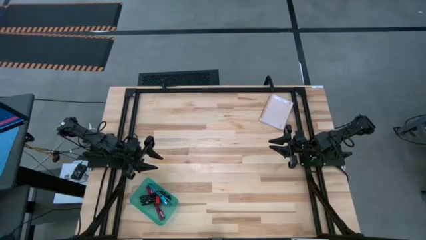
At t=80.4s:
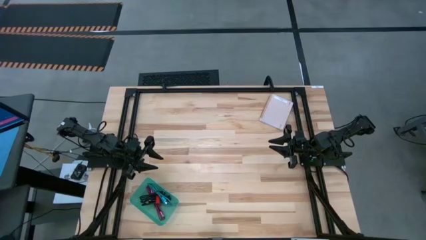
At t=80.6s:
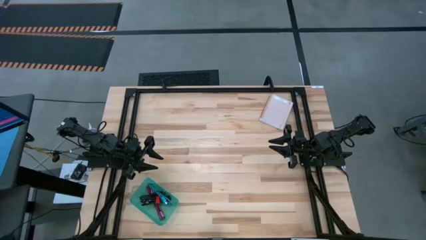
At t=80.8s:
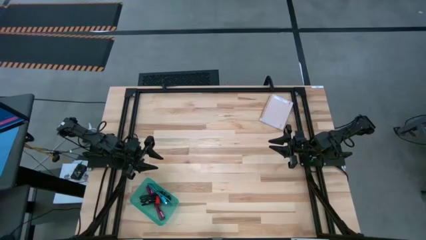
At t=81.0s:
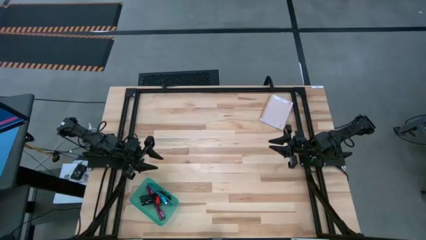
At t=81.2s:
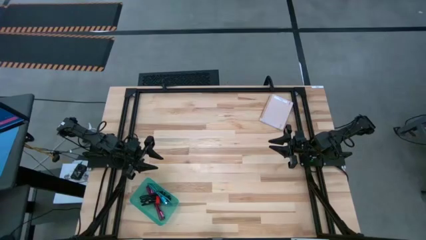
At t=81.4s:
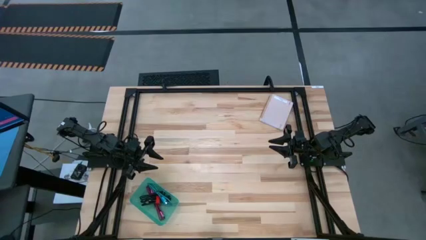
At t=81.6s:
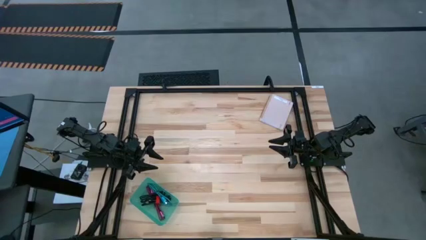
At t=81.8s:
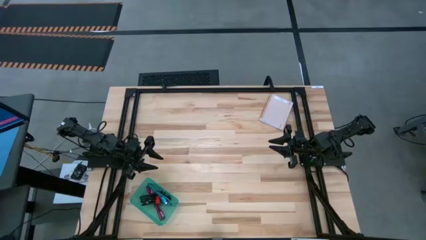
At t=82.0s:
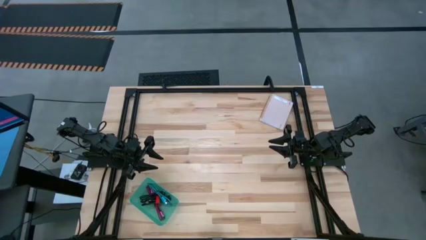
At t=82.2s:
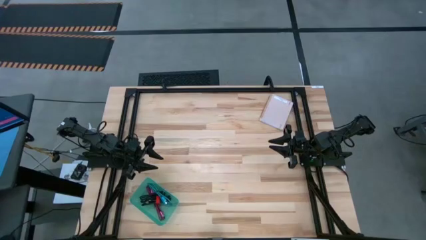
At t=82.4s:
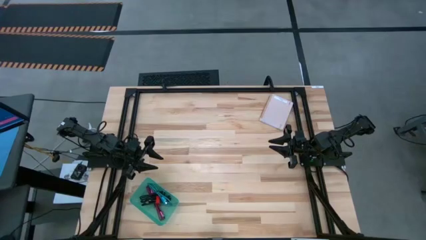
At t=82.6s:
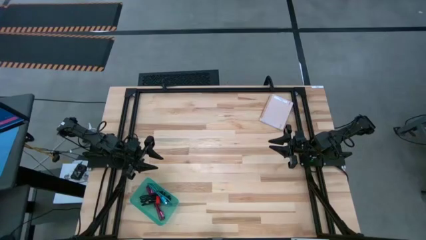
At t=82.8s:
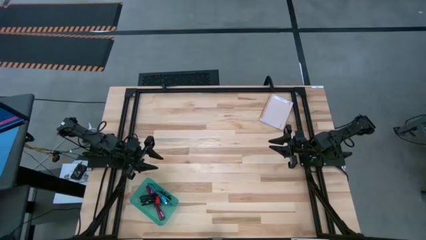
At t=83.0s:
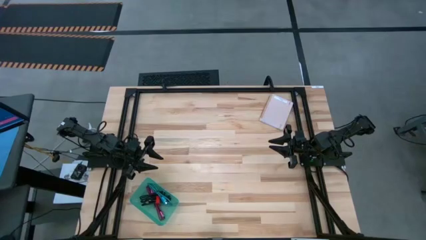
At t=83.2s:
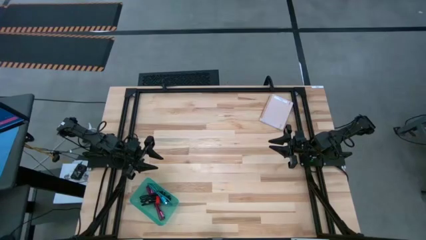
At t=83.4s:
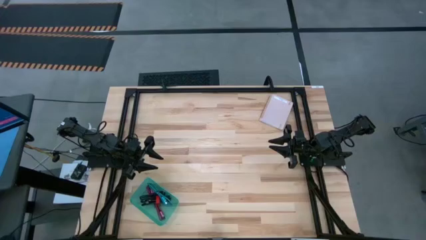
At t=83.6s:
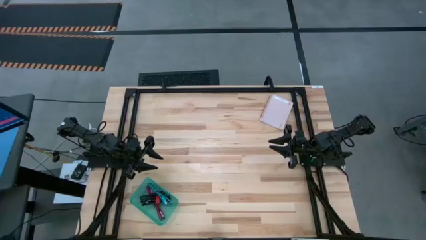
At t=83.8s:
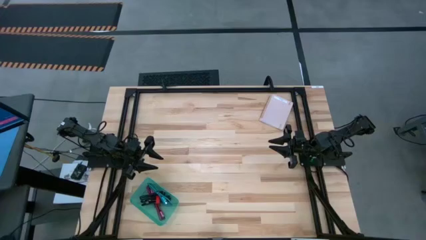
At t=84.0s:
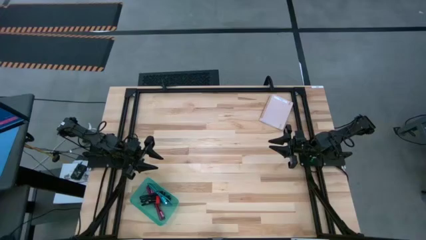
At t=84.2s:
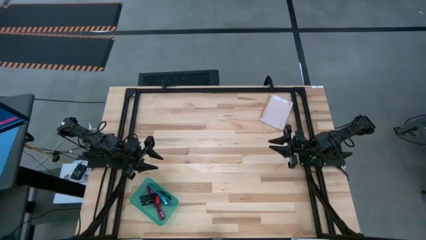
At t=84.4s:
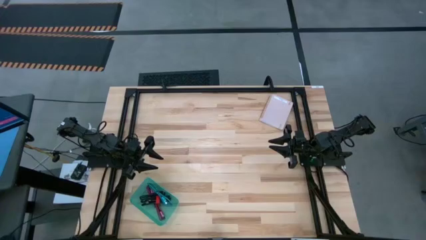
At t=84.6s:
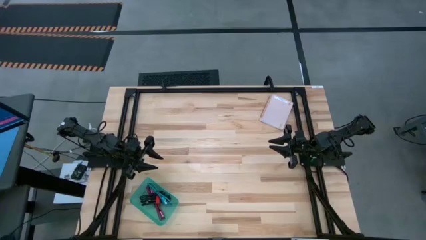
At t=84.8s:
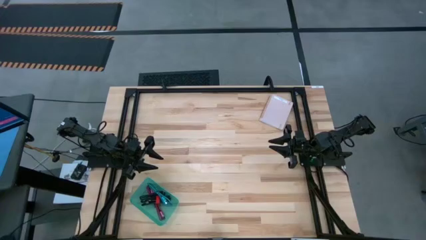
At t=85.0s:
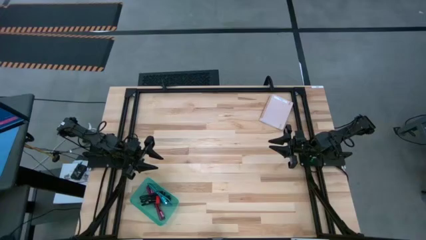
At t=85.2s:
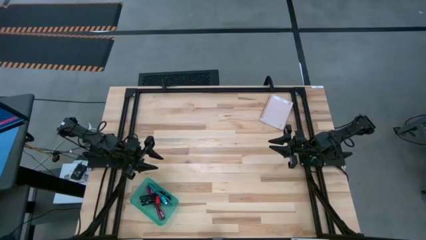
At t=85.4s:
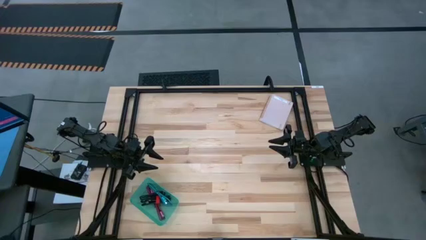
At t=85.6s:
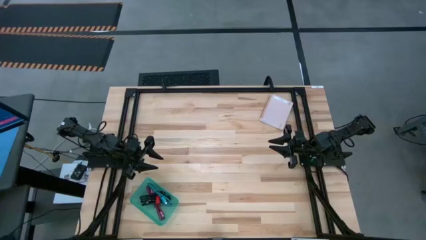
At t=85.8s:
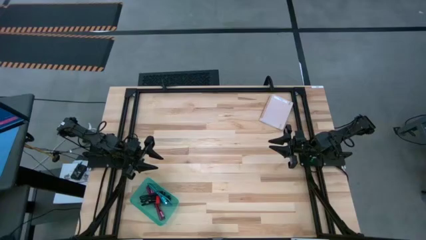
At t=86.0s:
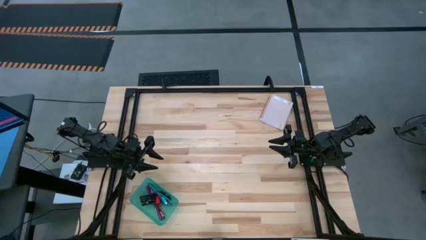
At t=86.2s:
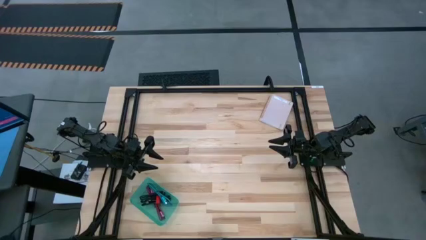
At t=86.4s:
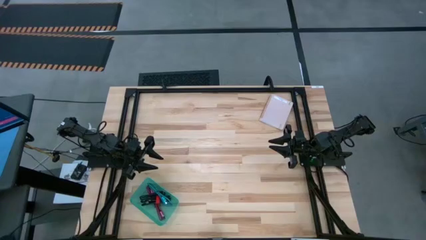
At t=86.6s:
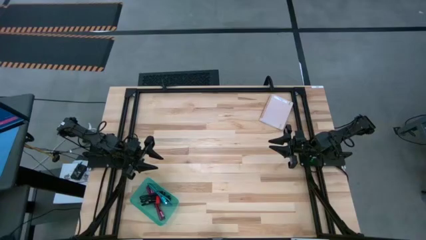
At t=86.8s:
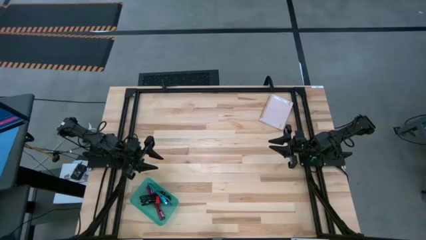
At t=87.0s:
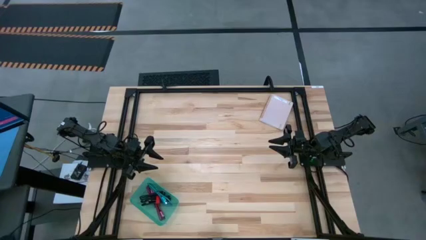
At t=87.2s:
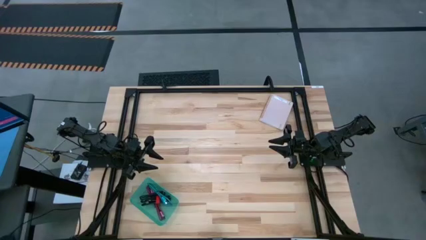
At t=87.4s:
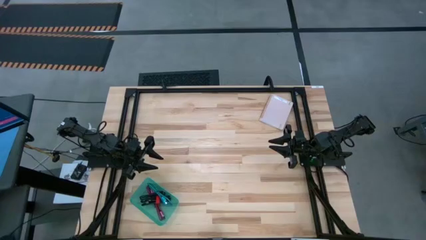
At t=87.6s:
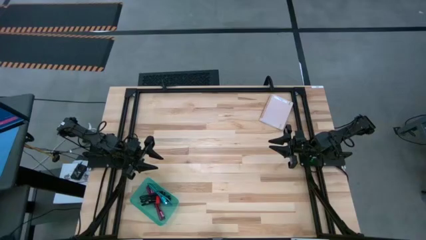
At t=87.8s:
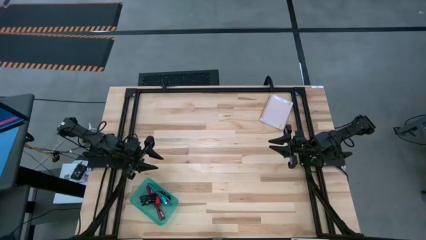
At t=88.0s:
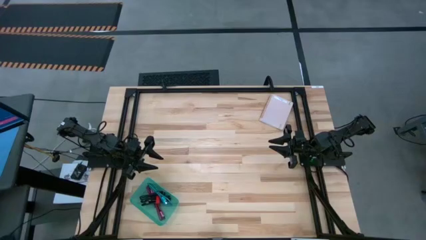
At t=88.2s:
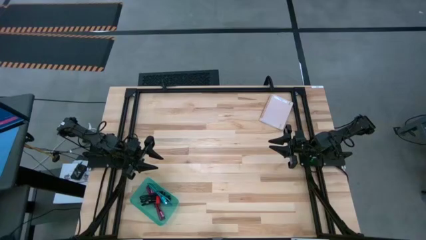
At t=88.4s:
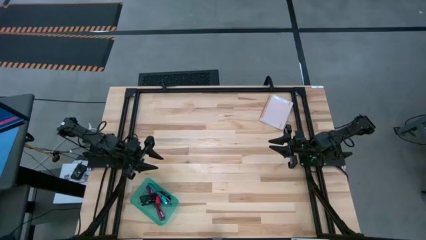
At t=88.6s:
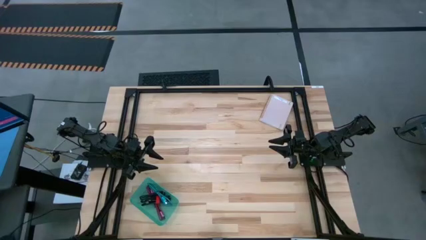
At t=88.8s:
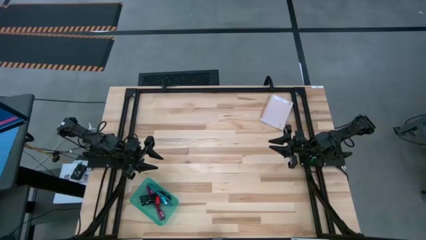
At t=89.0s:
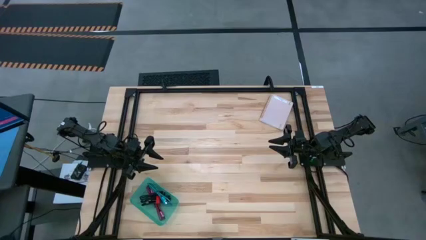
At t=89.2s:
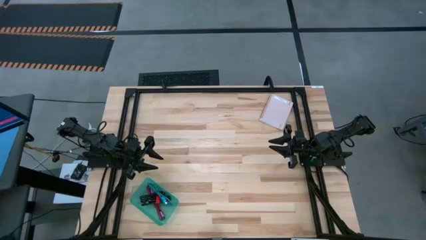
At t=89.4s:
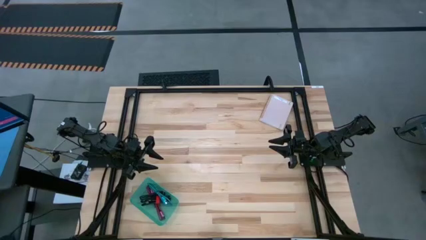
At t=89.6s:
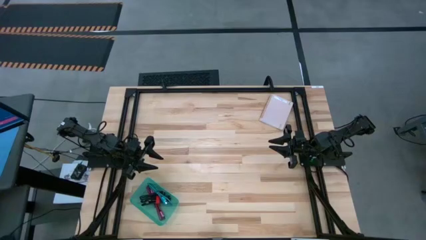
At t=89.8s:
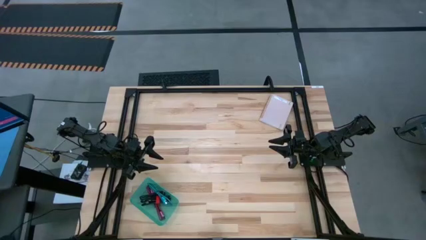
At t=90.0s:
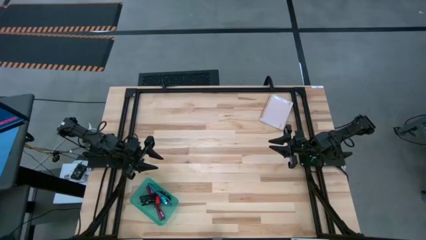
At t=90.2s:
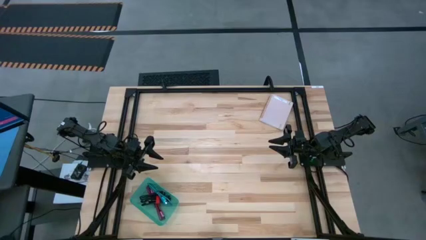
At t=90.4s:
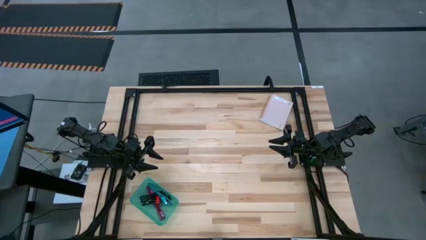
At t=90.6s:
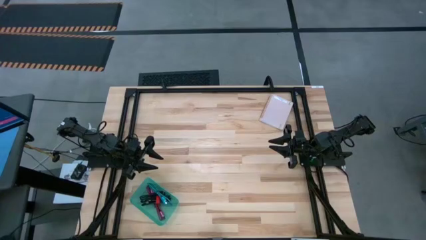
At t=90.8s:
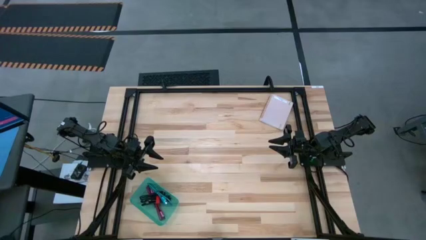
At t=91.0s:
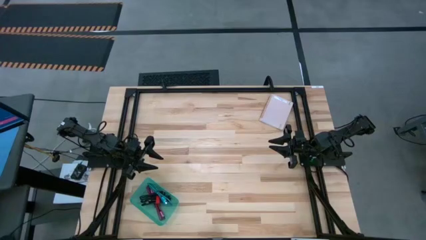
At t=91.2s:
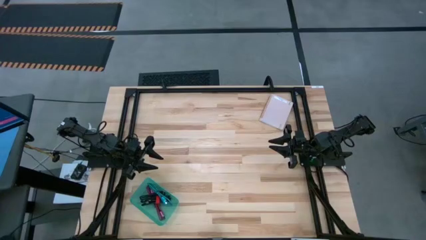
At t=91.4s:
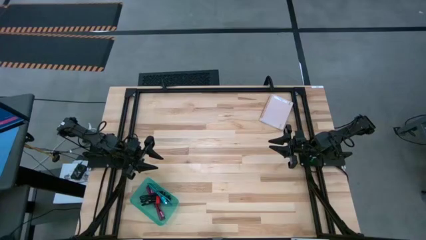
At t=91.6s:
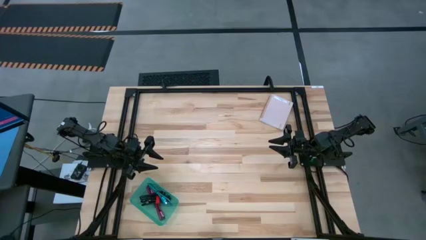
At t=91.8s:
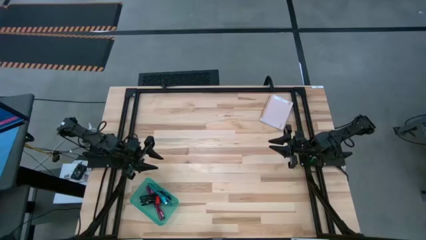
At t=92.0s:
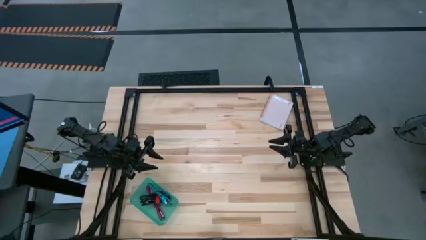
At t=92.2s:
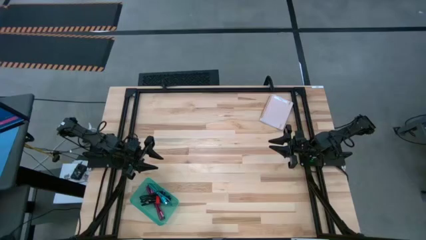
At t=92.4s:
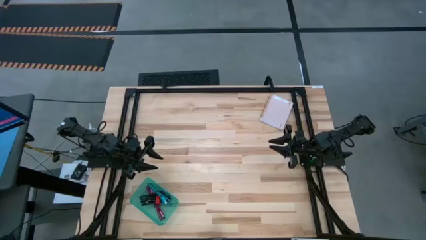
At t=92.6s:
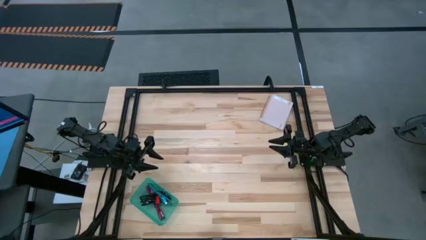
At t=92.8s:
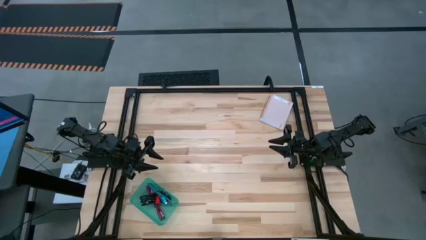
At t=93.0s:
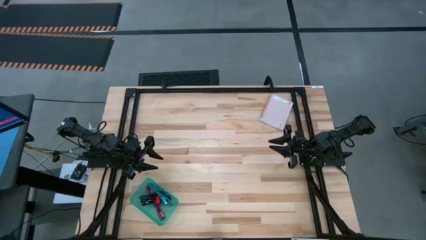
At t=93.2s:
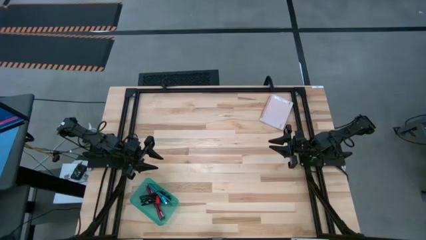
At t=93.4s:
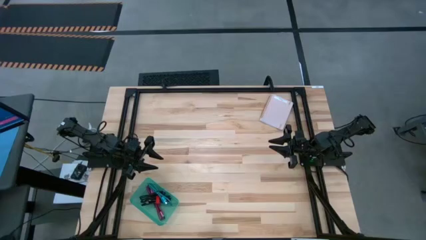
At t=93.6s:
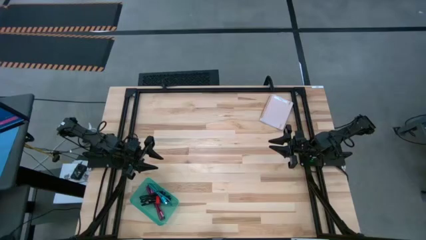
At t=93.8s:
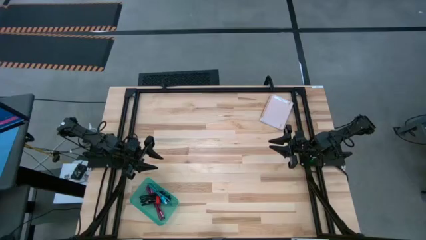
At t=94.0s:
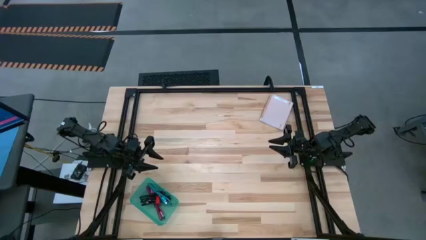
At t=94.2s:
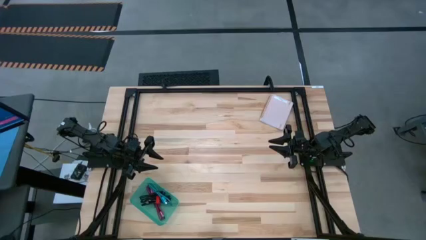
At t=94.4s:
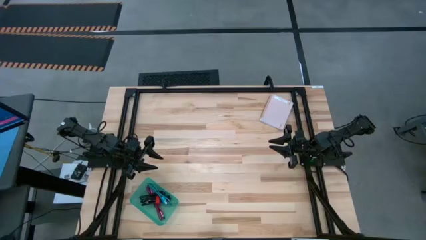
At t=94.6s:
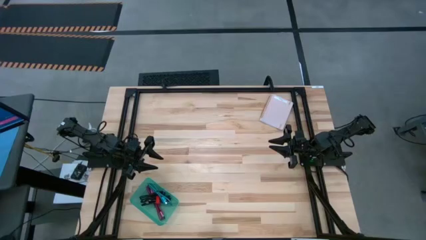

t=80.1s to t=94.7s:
Task: Pick and place USB-C Cables
Return to Home Position
